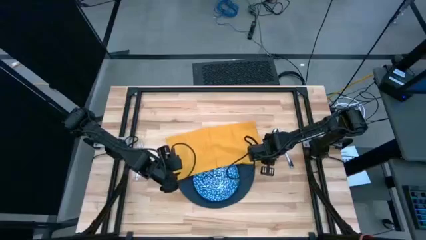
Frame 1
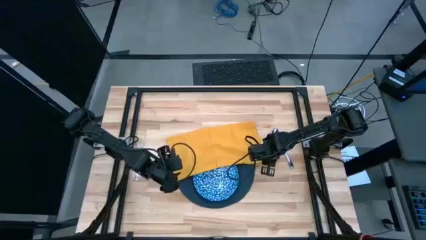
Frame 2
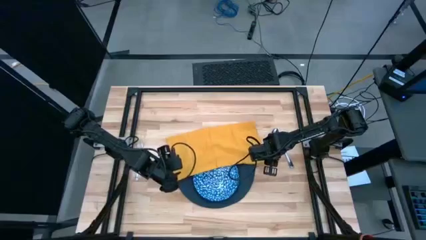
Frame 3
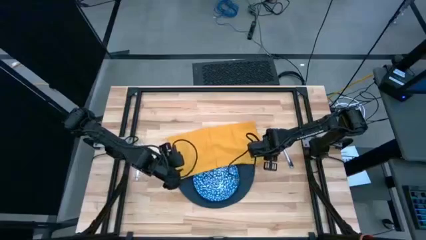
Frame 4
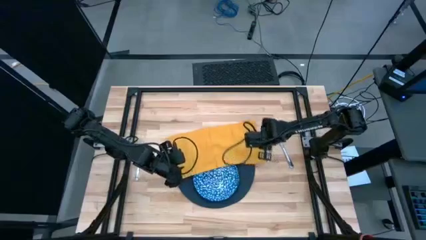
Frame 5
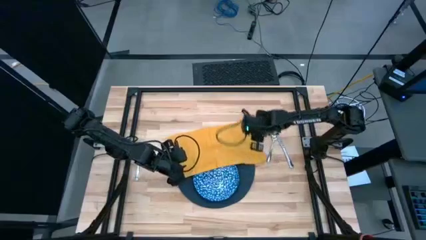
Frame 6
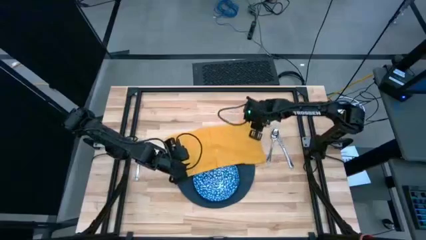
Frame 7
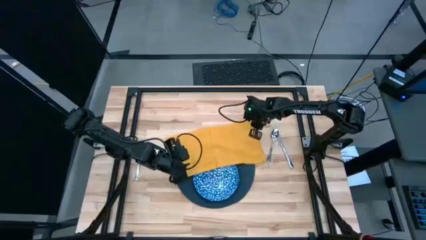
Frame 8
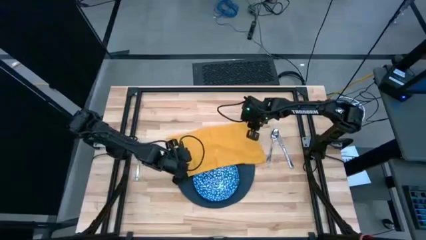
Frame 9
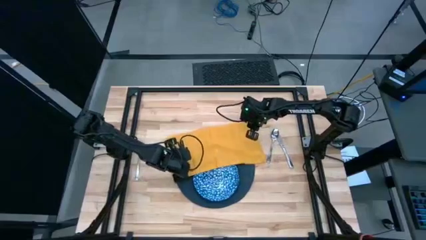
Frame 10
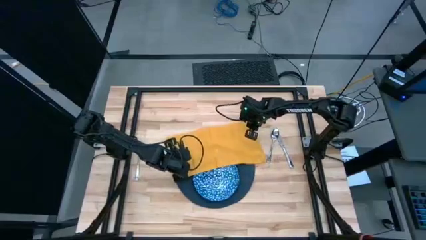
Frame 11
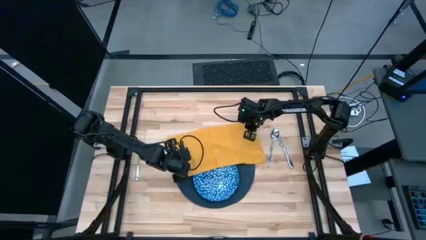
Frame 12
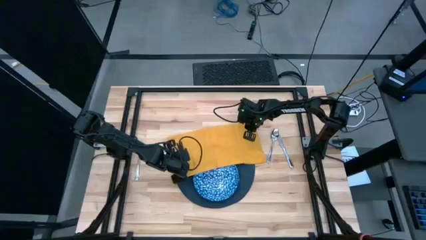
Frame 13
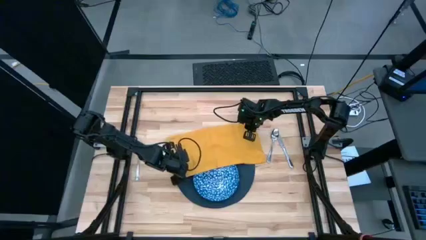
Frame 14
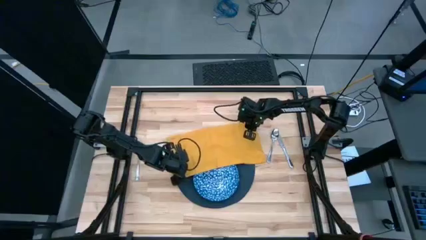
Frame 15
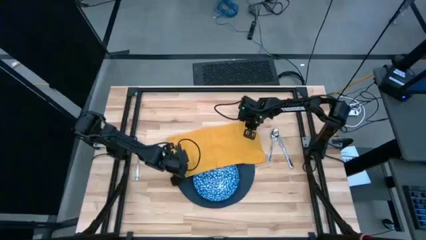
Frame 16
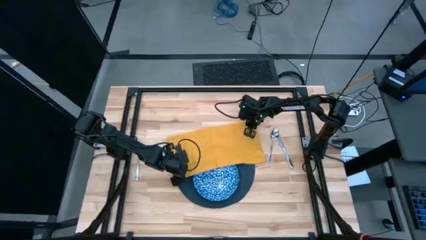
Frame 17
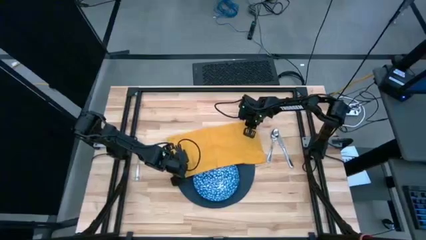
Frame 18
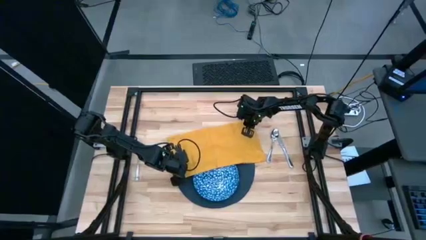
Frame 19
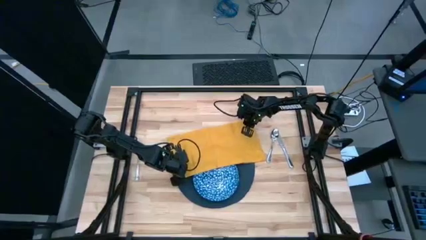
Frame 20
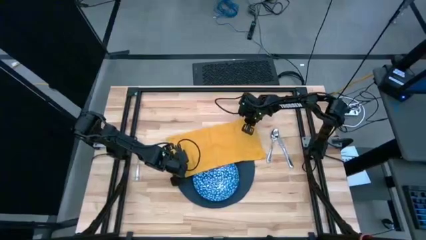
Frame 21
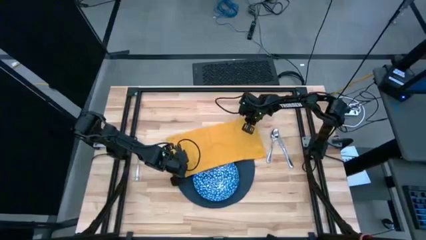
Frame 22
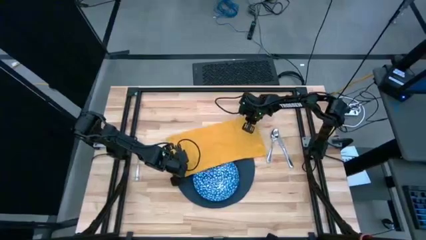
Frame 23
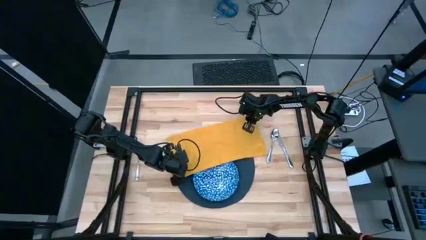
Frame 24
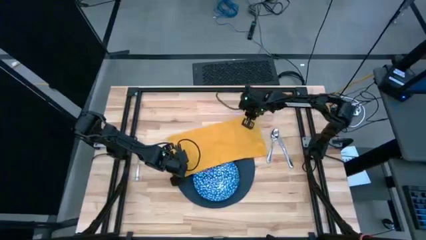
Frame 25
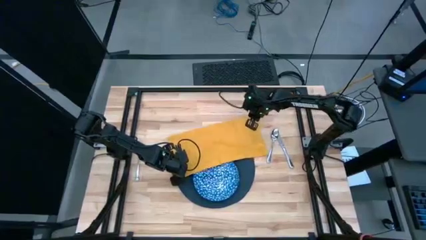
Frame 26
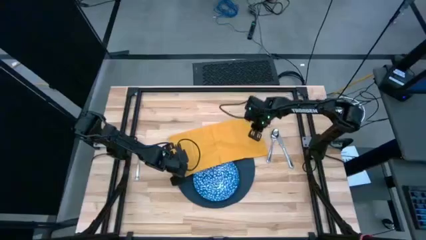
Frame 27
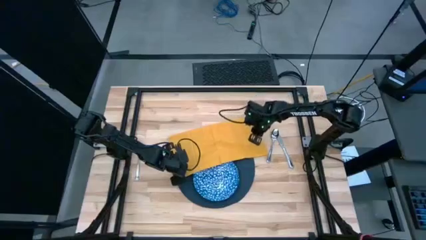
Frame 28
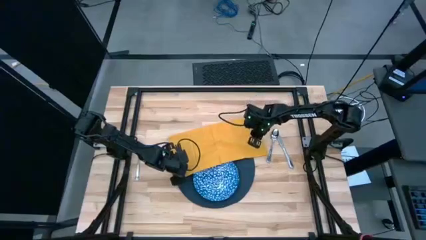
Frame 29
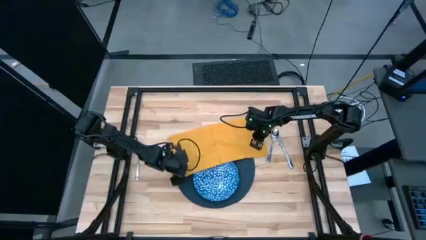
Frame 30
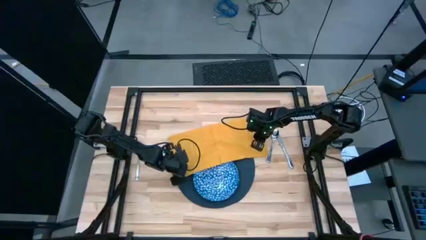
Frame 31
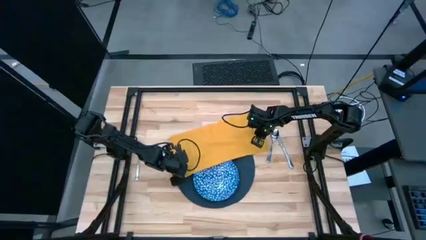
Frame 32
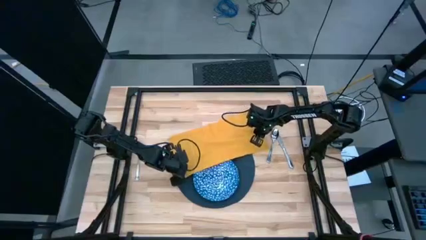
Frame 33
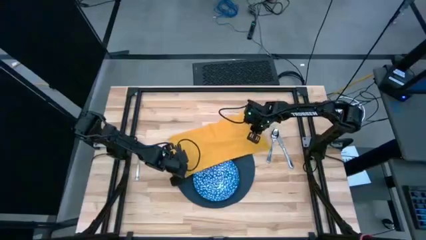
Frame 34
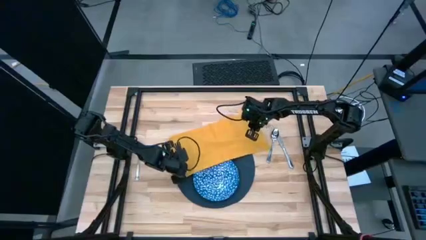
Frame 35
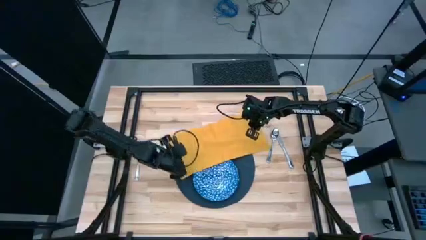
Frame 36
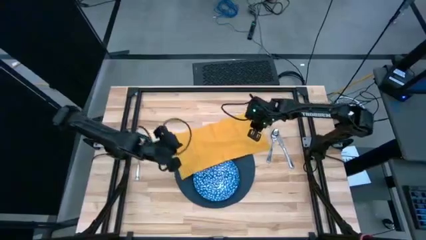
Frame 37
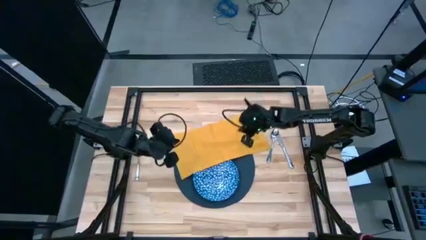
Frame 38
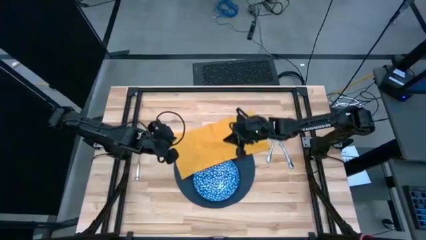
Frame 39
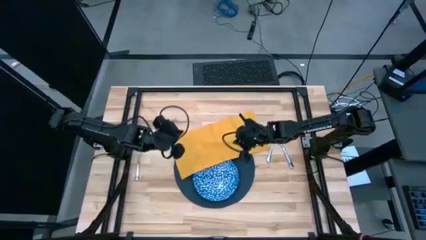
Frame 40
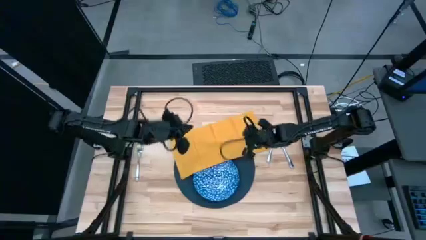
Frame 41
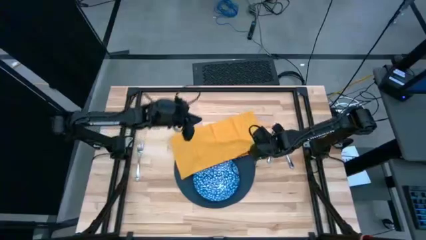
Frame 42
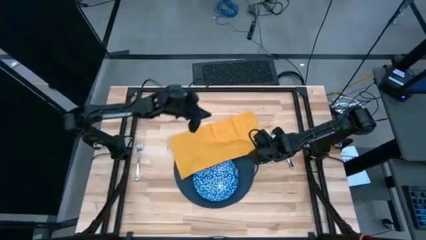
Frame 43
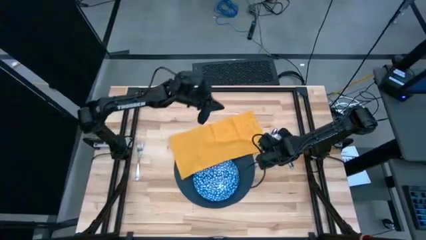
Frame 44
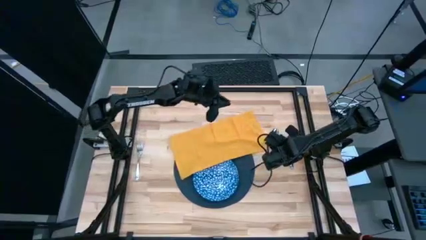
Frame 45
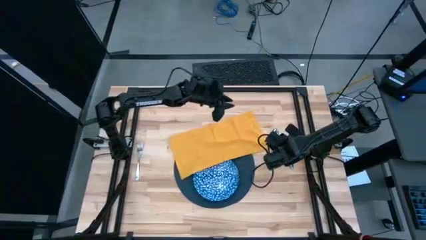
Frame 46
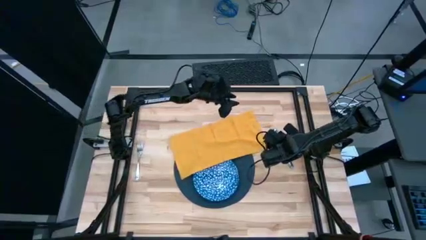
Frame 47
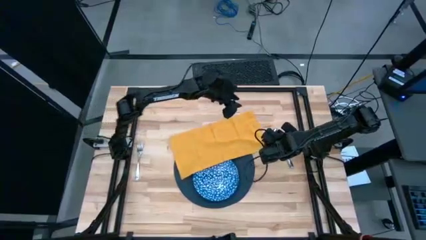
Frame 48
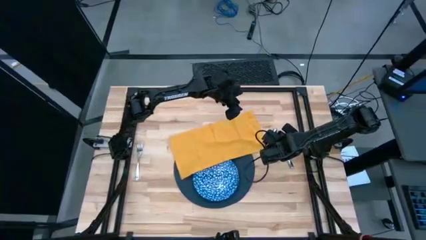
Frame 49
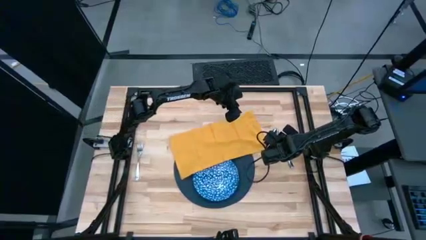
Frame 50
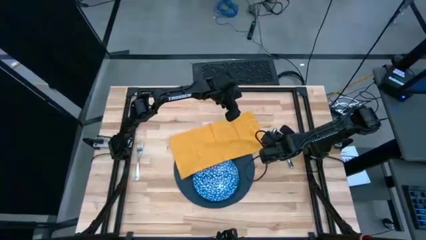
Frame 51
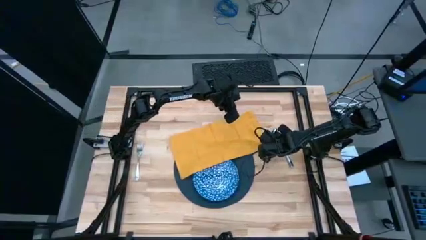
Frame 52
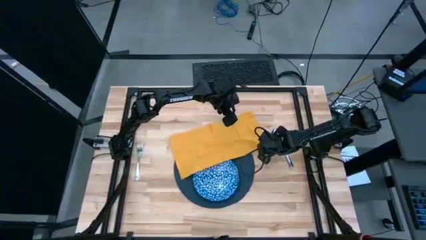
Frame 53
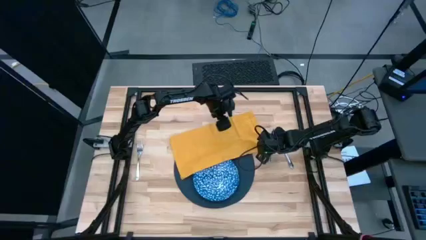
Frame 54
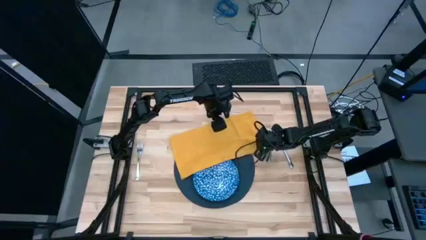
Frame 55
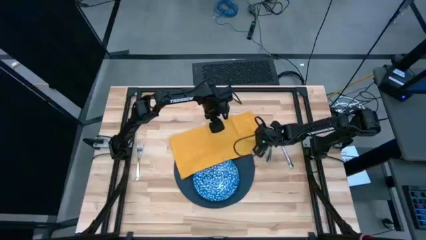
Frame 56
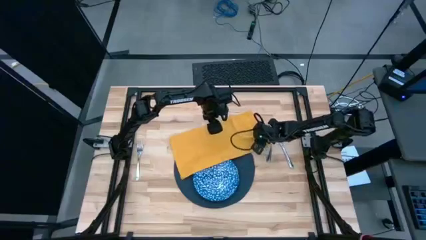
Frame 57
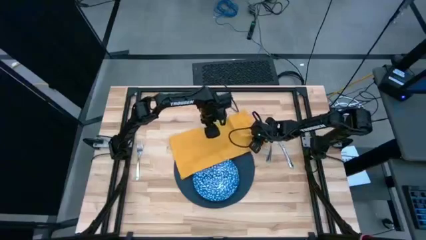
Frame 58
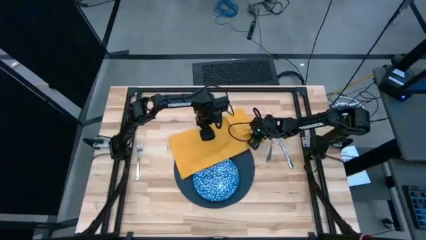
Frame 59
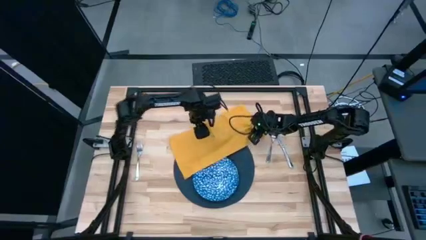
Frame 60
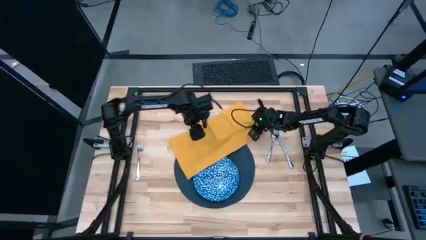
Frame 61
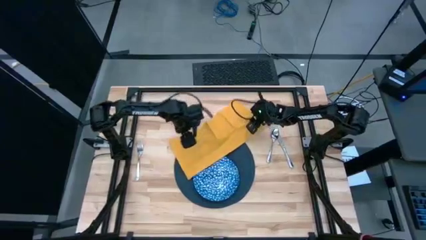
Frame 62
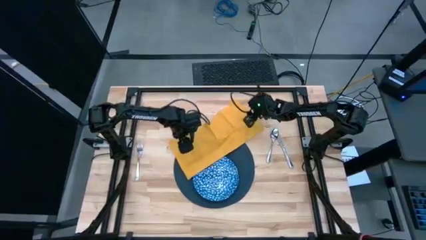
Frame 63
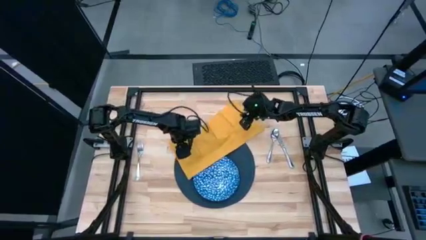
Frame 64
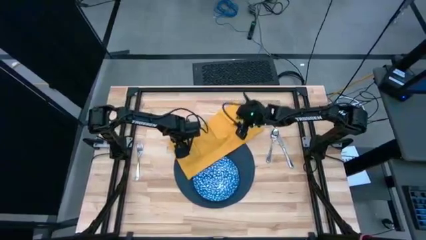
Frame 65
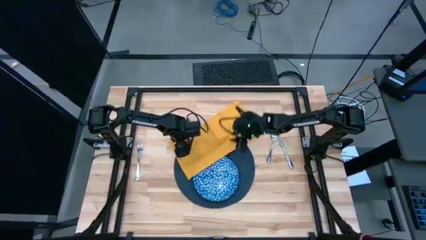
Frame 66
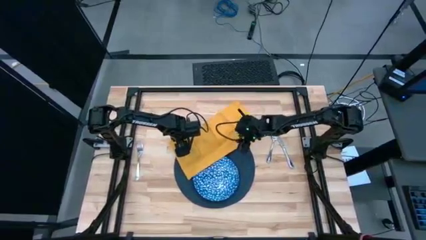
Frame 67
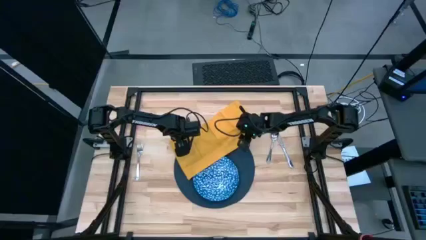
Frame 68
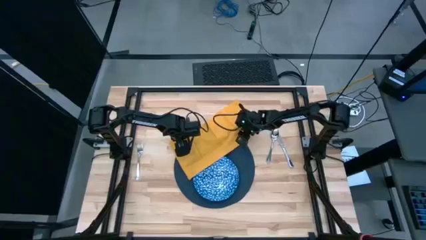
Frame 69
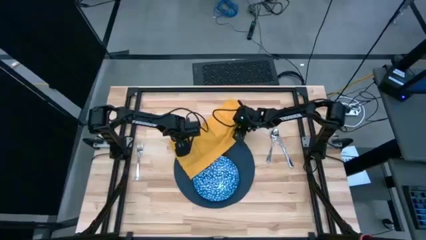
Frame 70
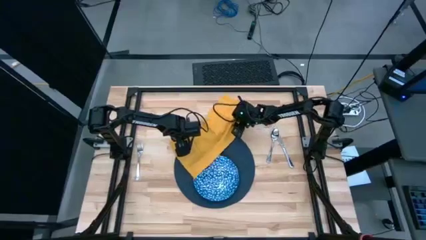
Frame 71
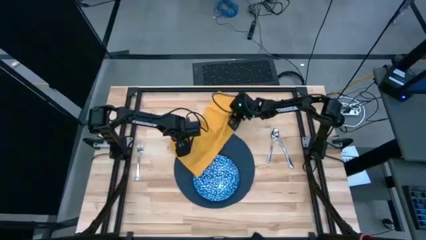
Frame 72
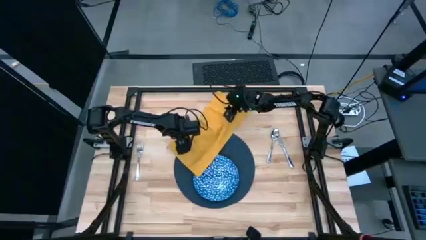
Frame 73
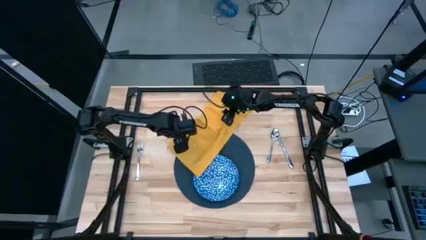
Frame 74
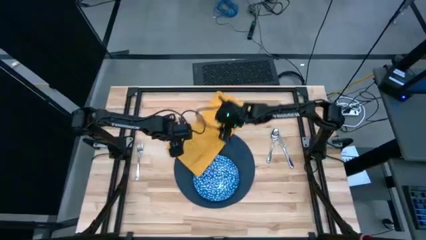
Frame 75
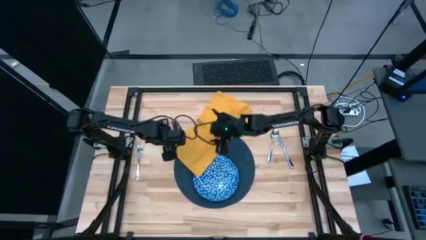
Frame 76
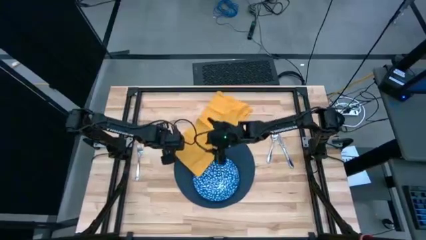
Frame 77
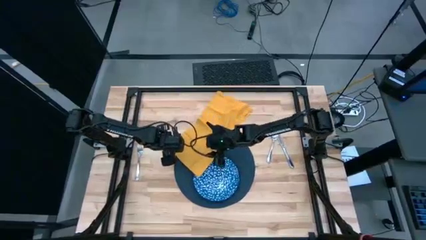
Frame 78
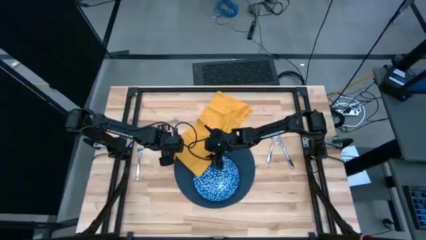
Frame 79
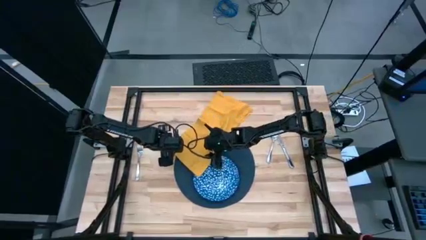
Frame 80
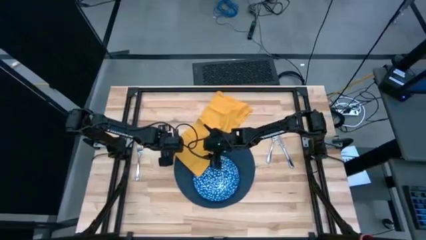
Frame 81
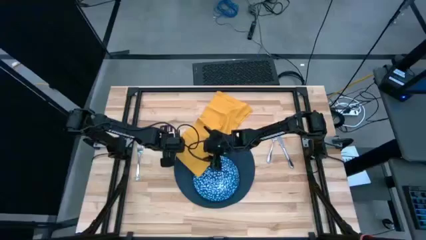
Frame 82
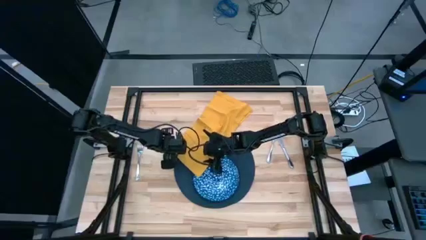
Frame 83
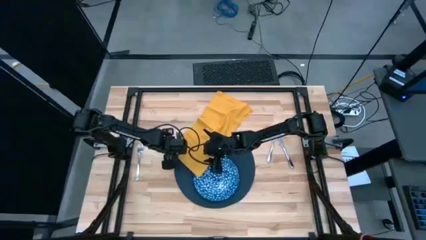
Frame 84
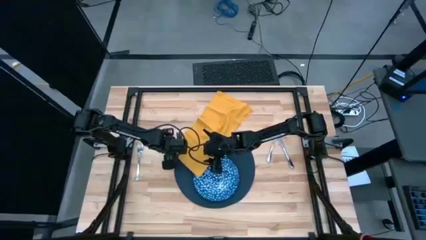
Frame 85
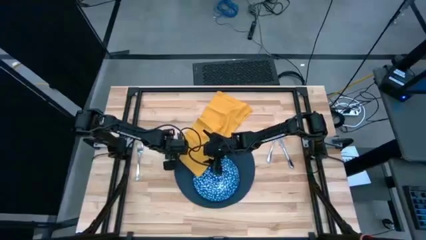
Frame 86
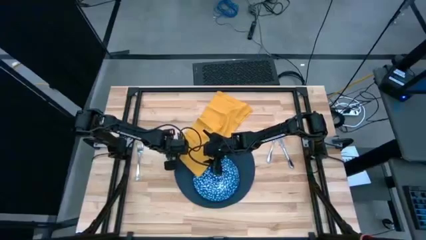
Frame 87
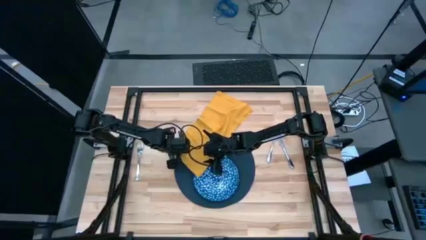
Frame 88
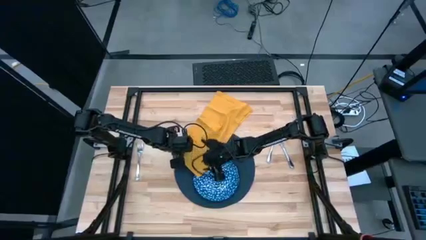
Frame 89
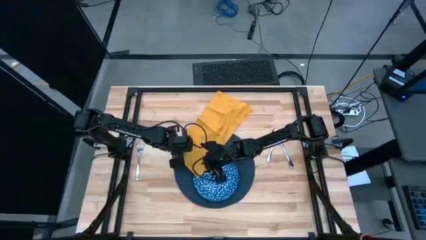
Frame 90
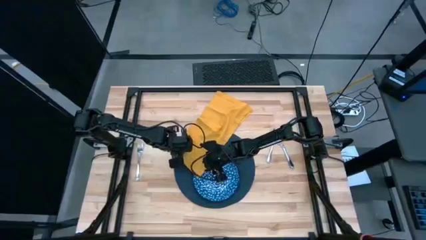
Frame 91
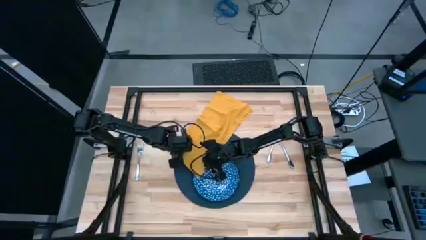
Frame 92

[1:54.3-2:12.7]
Task: Set table place
Fold the yellow table napkin
